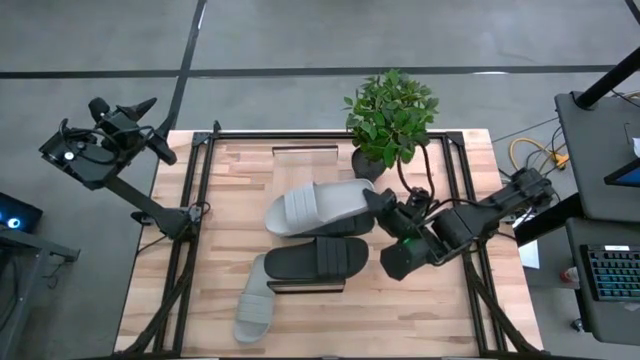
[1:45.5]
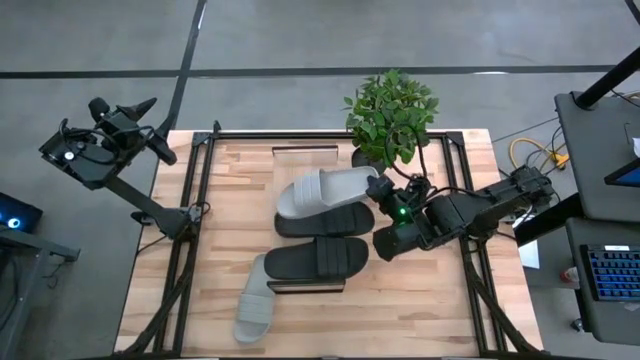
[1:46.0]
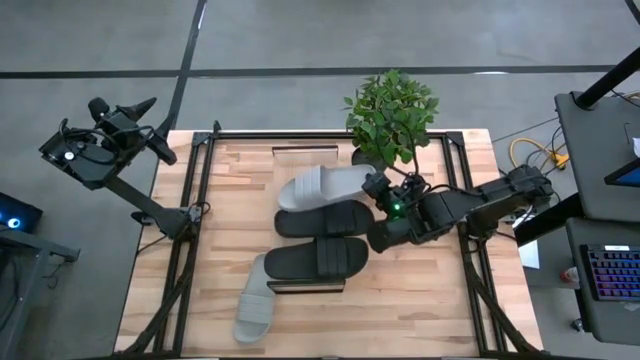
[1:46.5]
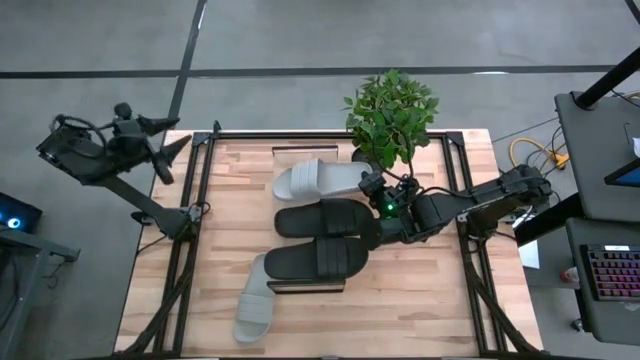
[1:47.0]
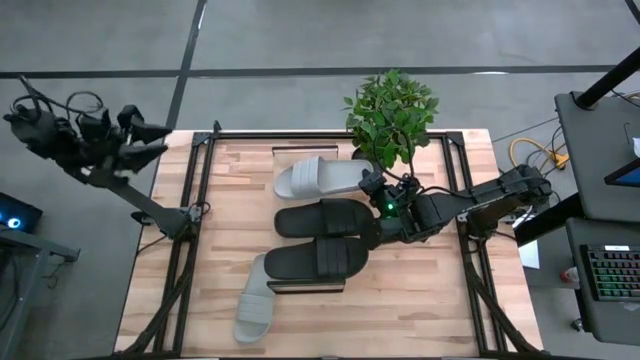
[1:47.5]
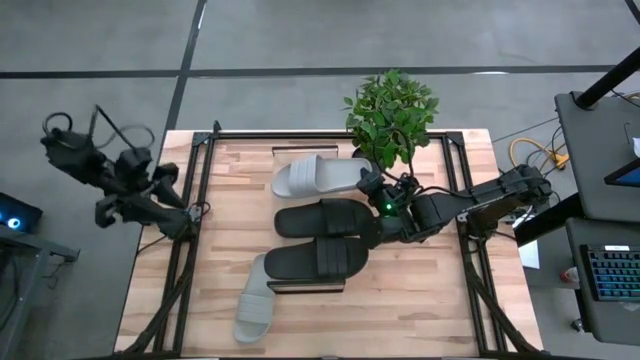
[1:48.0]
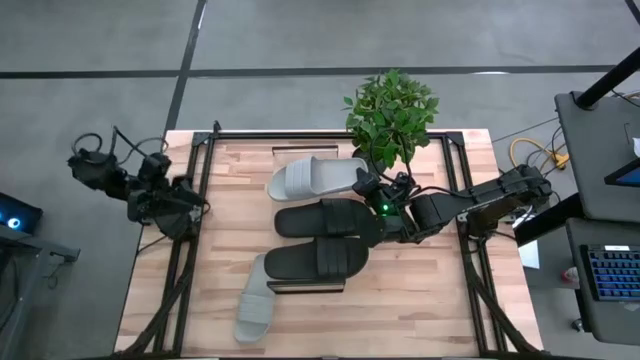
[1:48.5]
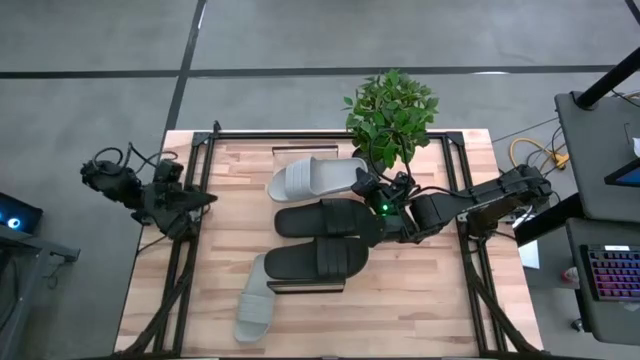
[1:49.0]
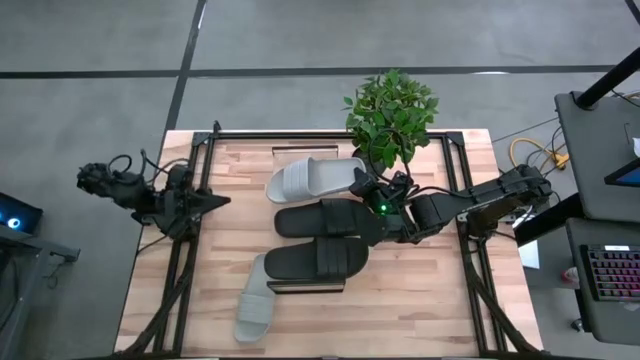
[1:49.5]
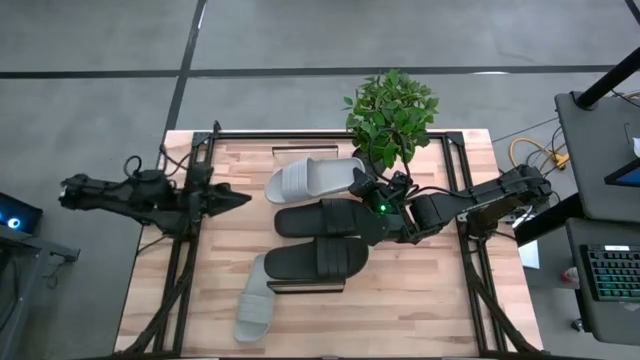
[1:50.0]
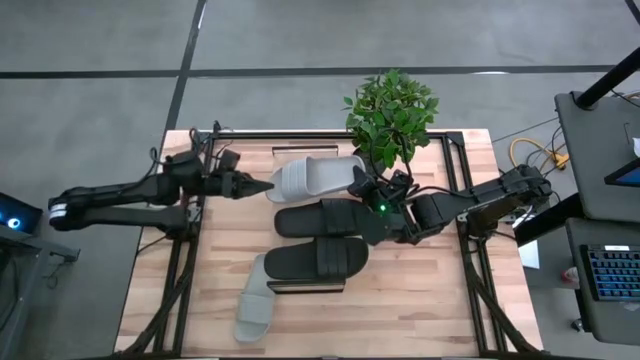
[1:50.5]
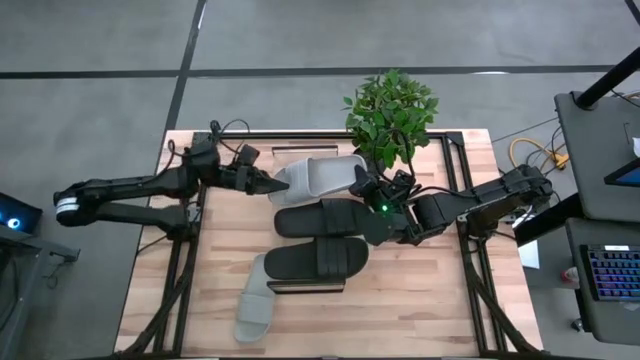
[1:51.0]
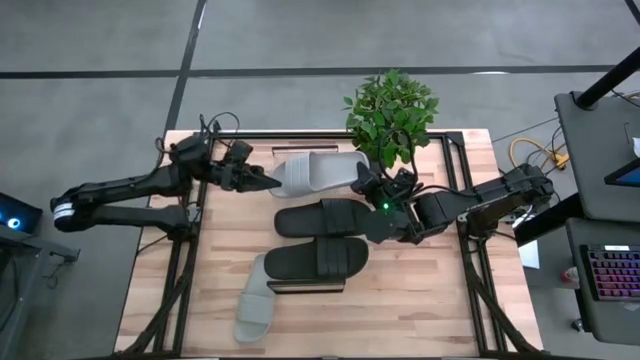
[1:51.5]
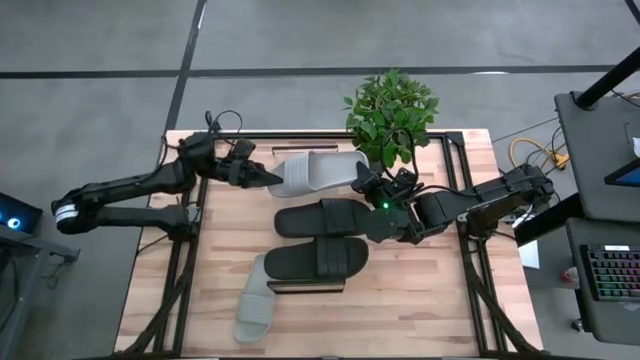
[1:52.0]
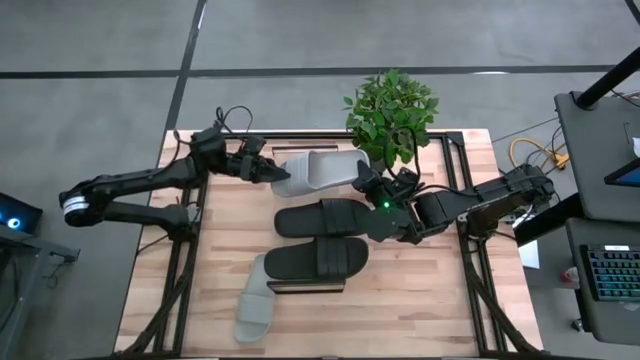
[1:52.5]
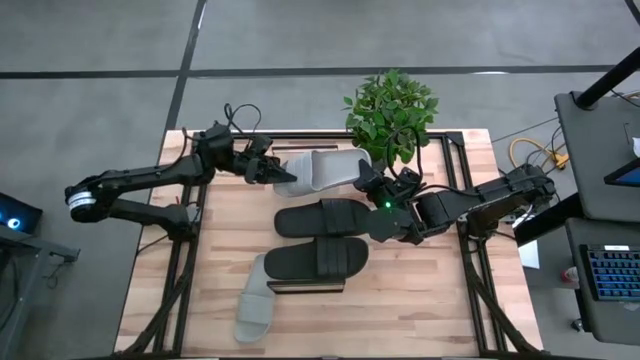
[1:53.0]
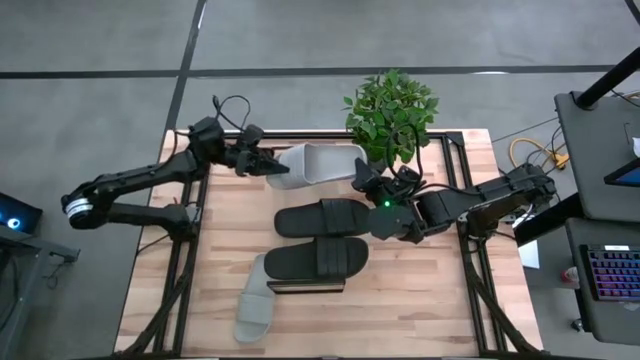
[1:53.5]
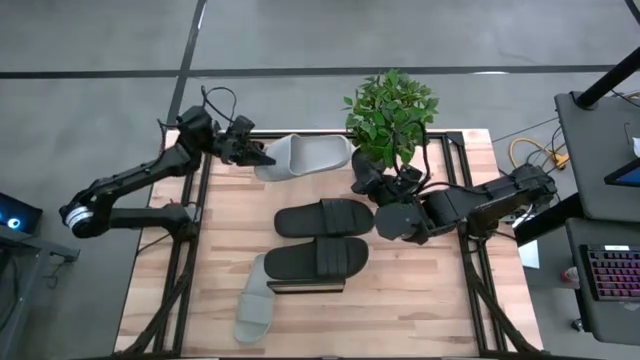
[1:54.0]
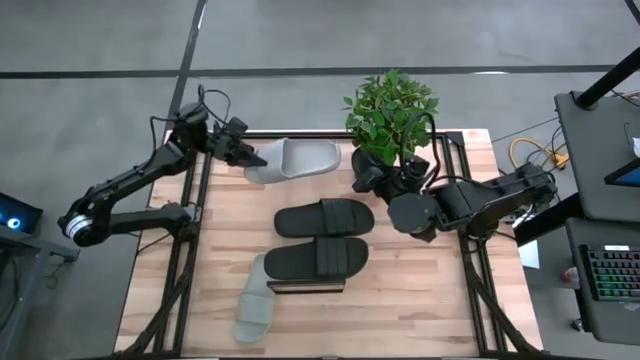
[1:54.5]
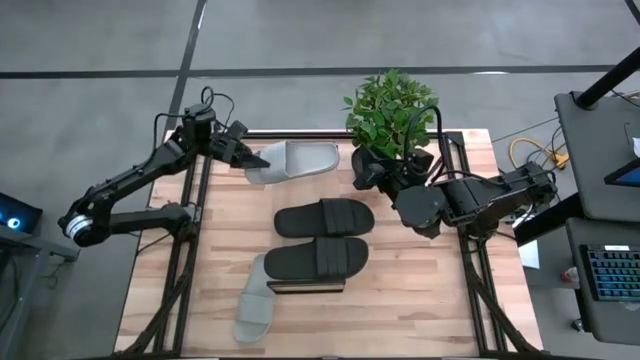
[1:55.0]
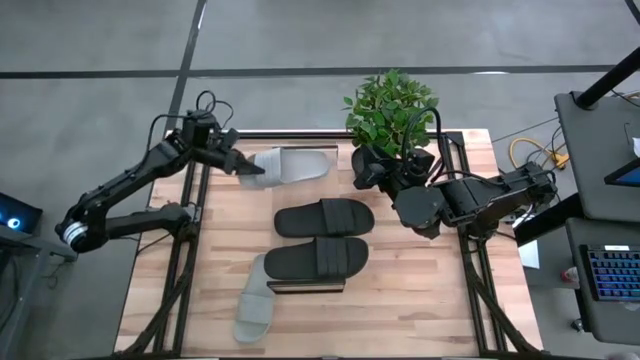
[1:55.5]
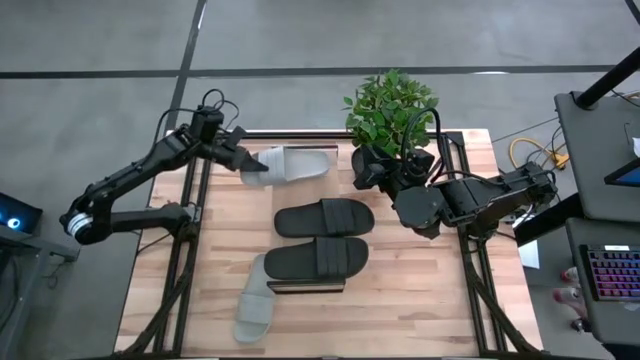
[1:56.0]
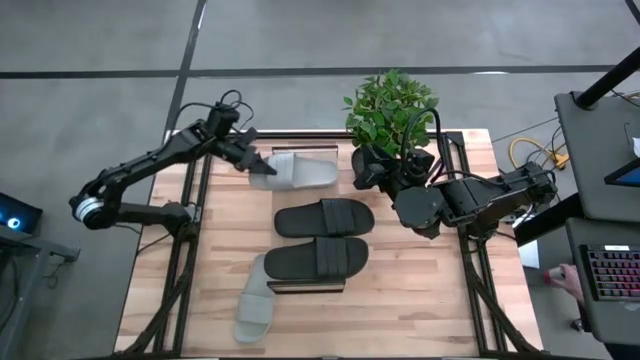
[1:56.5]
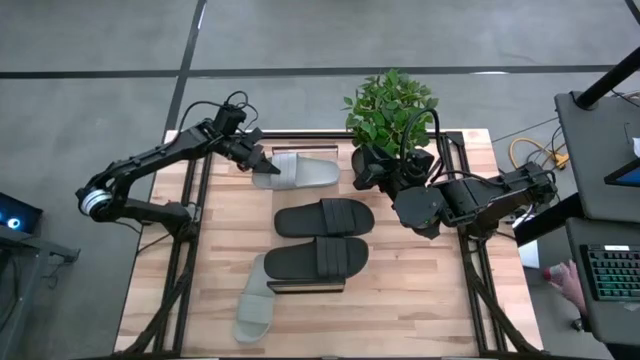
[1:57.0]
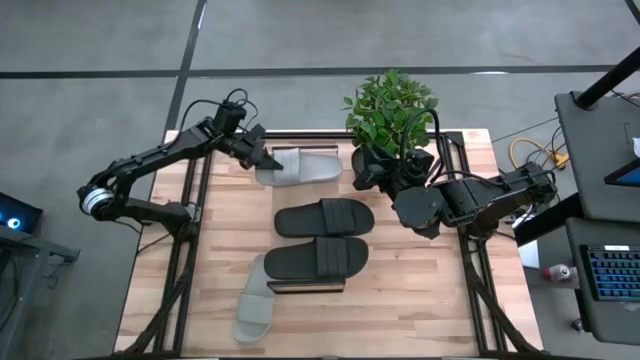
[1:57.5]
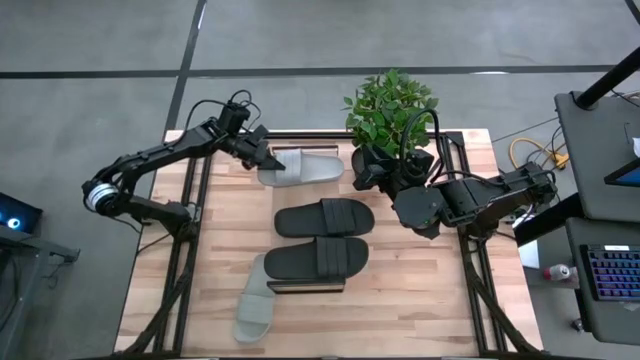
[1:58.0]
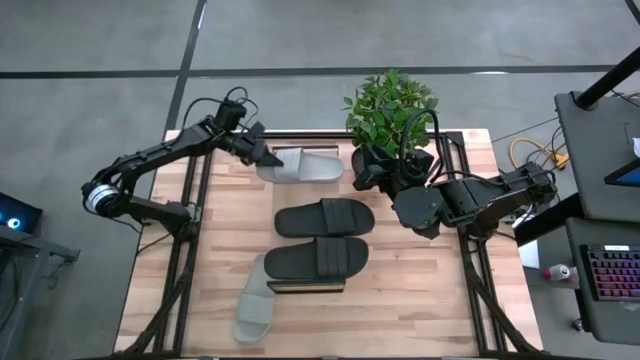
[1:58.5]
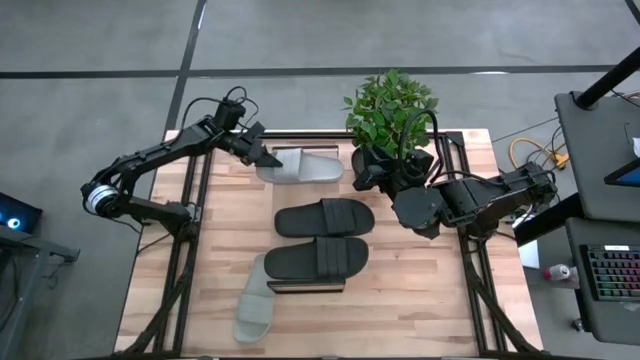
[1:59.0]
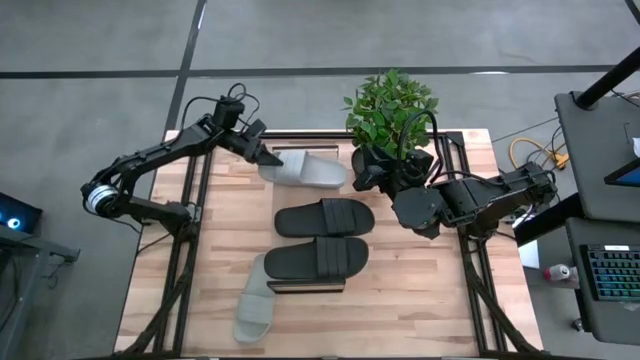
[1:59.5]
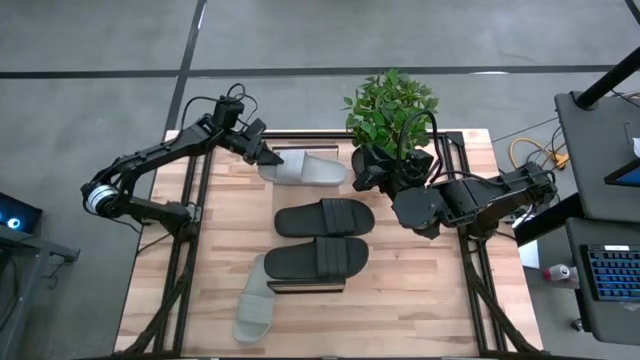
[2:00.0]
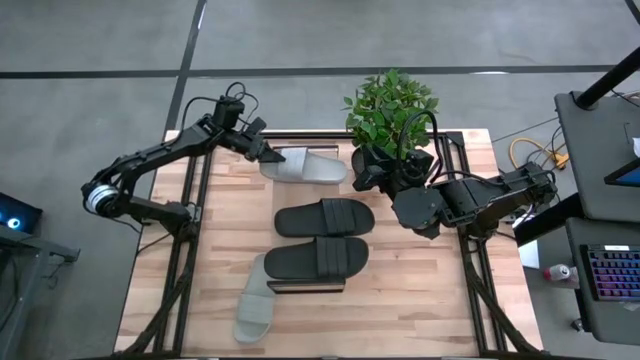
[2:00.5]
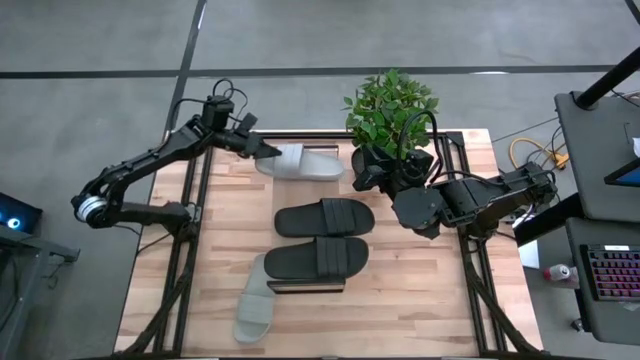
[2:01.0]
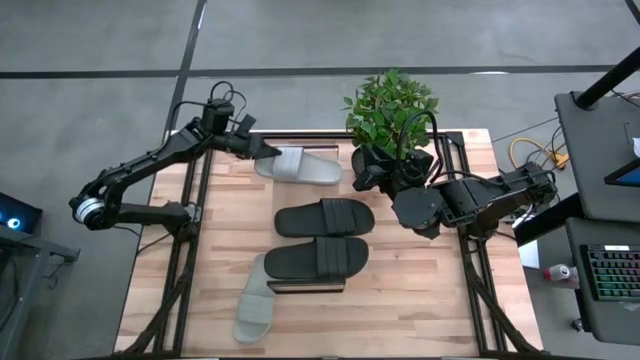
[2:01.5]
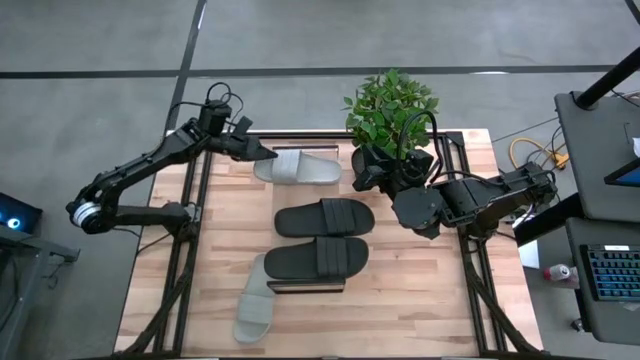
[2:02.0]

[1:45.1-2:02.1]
Task: Pick and place slides into the shelf
Put the left gray slipper on the shelf

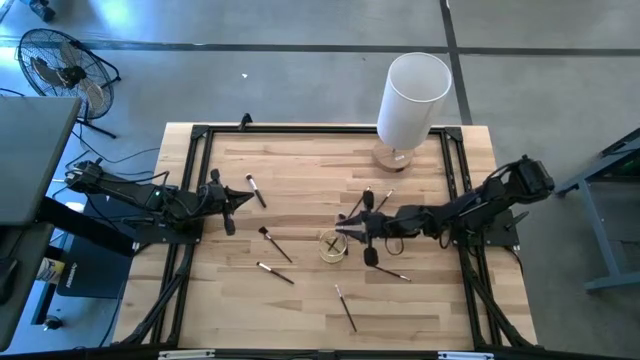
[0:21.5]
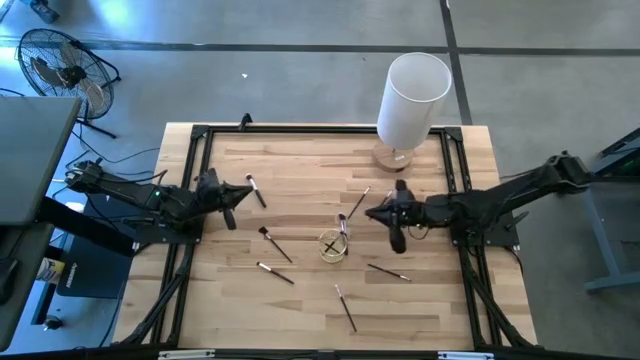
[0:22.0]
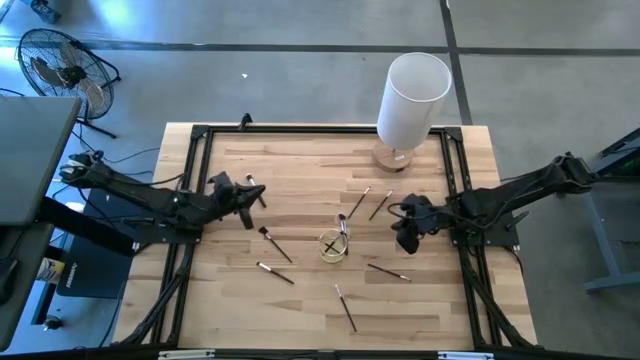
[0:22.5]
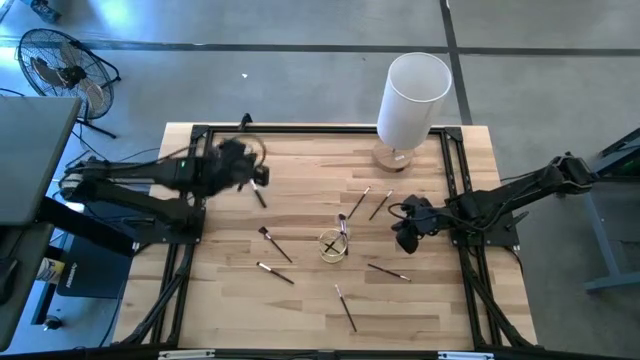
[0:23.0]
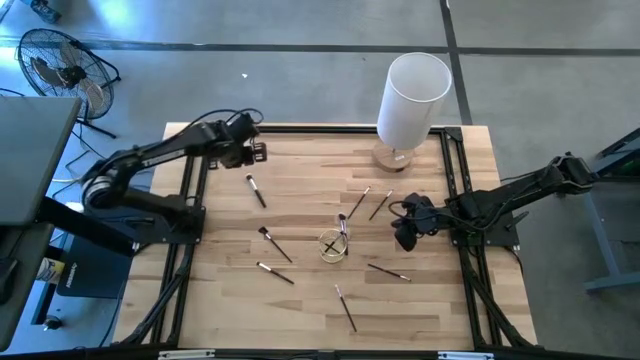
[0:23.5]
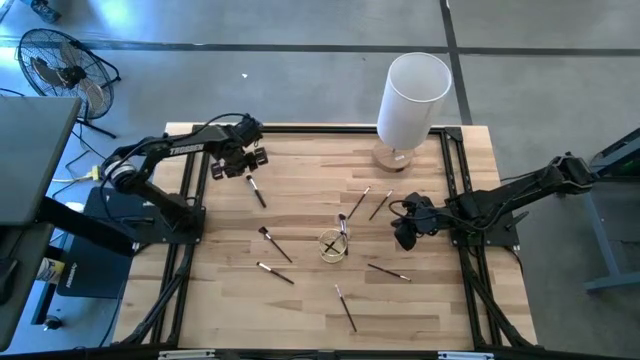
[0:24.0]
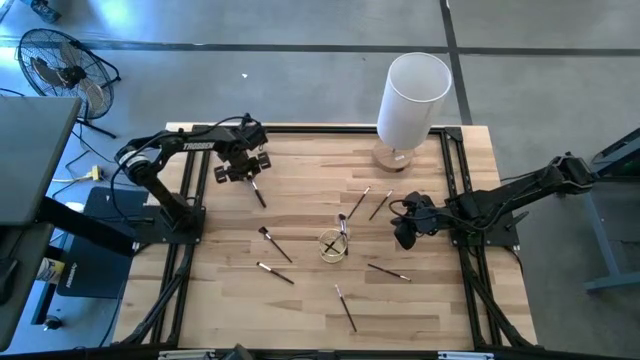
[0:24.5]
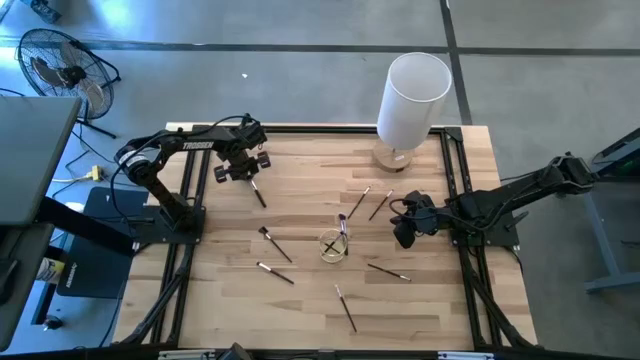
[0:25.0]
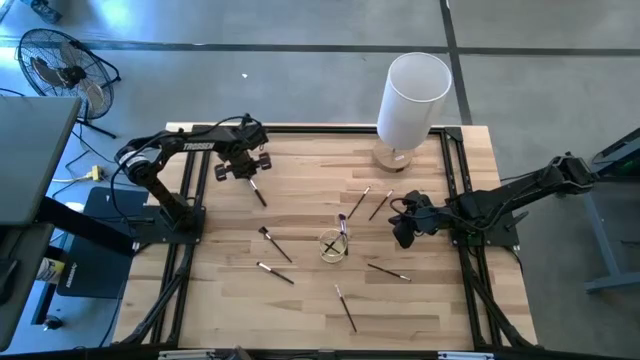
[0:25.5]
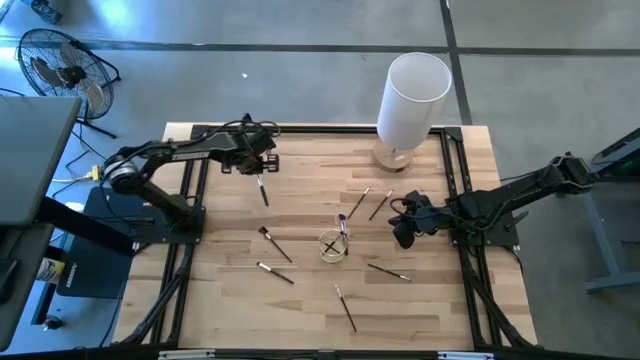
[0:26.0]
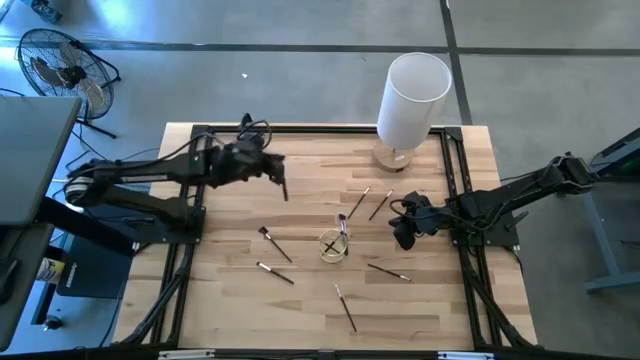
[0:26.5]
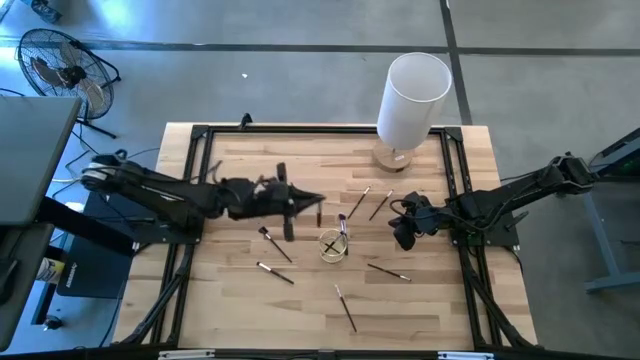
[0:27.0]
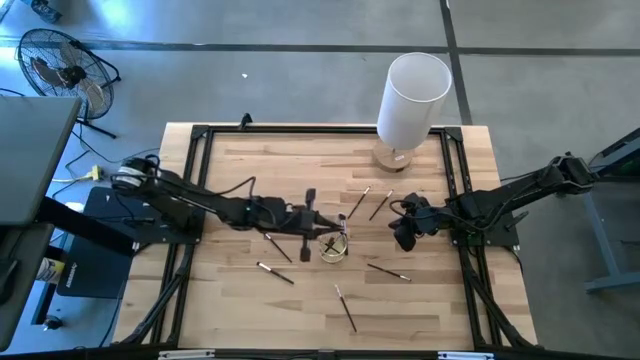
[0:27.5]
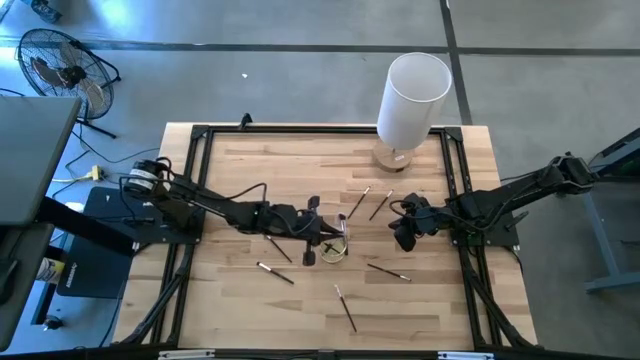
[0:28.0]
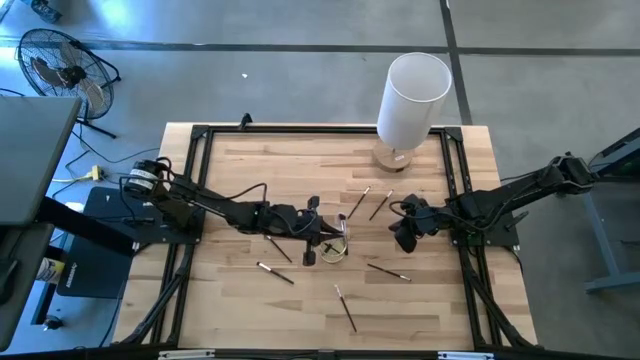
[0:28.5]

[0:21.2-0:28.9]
Task: Put items in baskets/containers
Put the left powder brush into the mesh organizer
